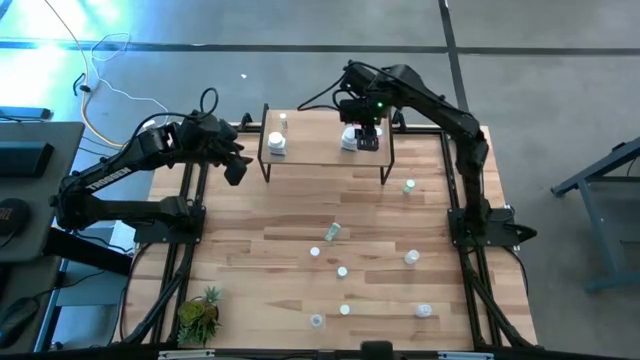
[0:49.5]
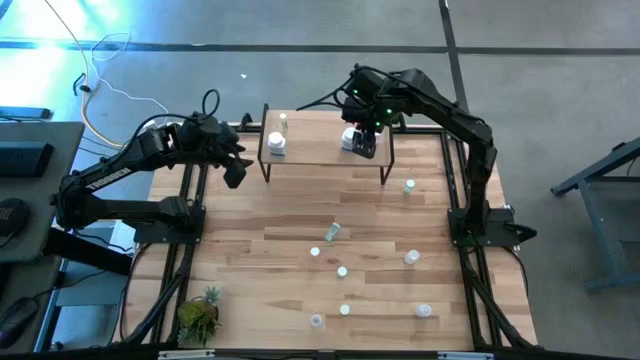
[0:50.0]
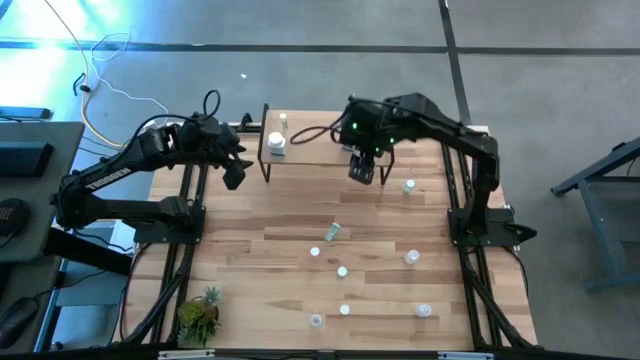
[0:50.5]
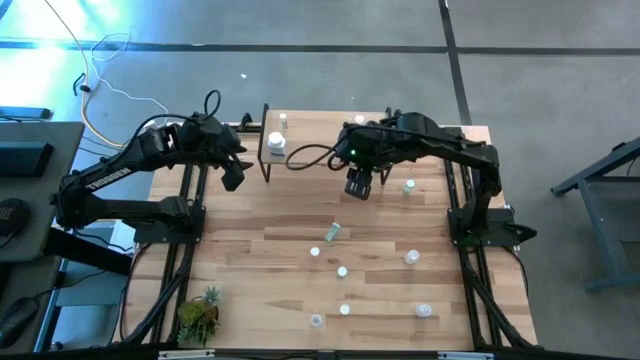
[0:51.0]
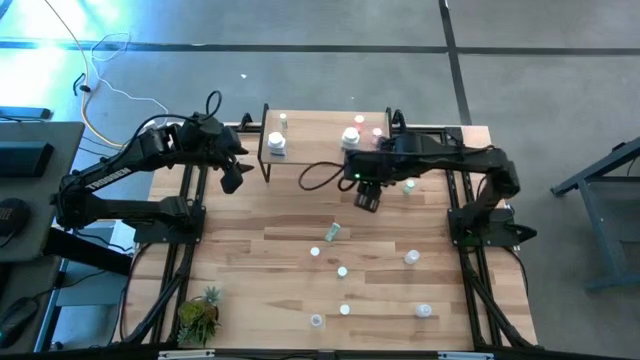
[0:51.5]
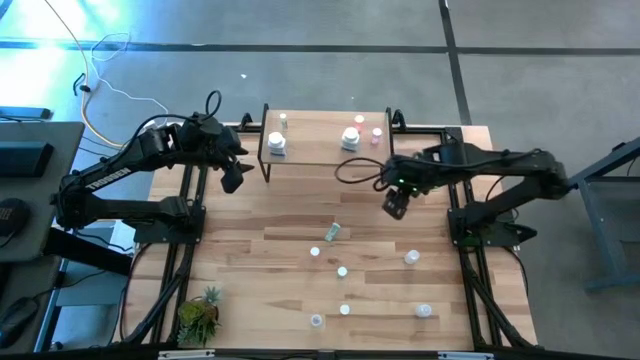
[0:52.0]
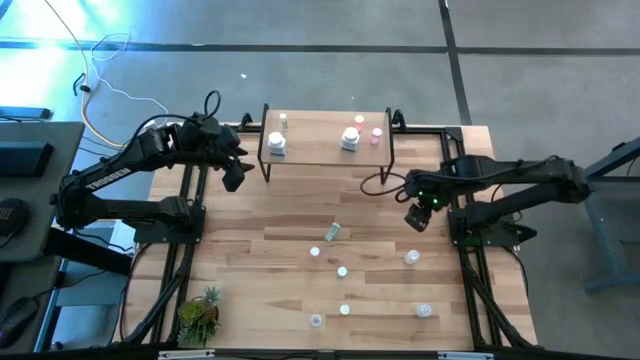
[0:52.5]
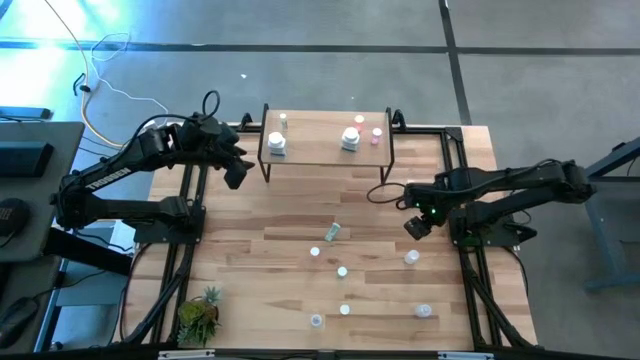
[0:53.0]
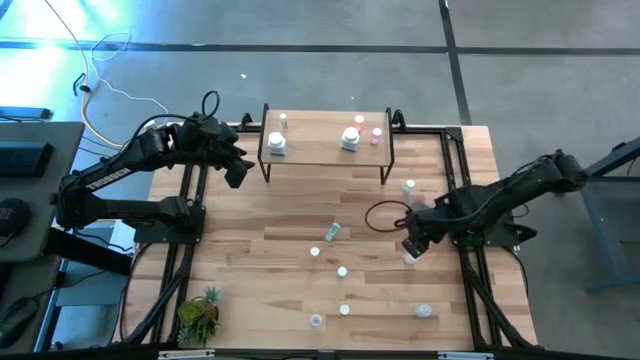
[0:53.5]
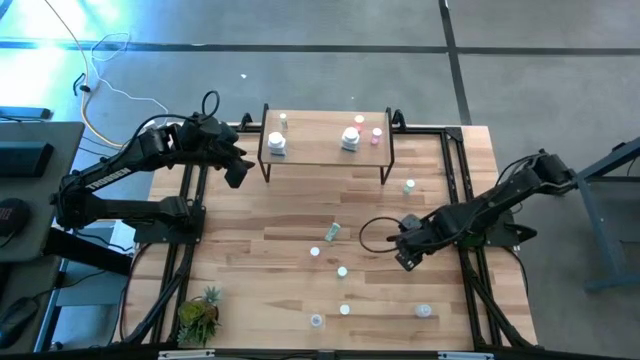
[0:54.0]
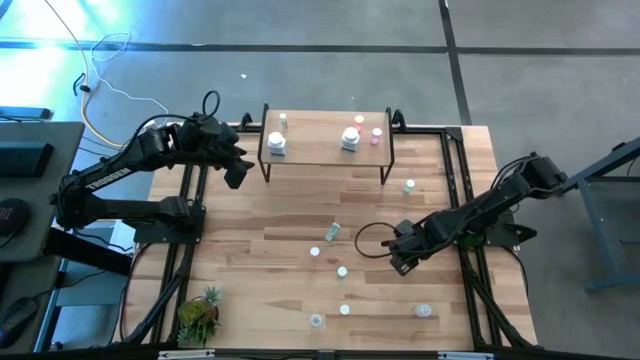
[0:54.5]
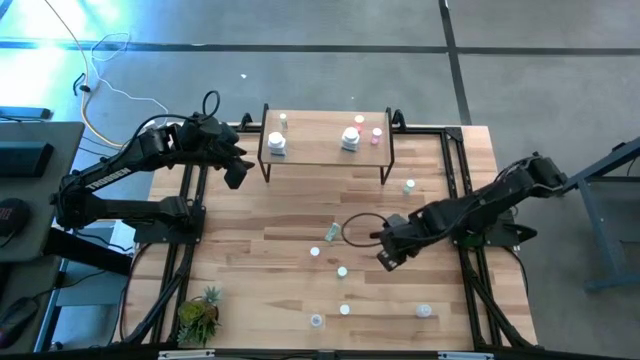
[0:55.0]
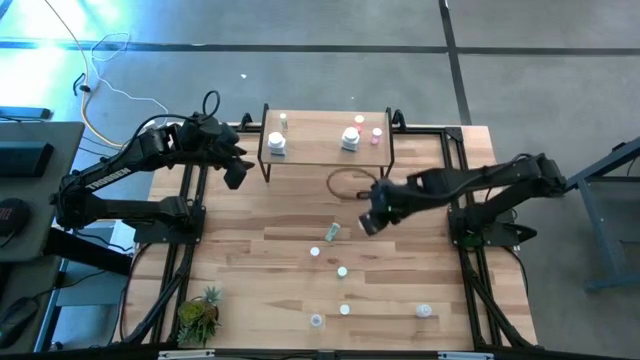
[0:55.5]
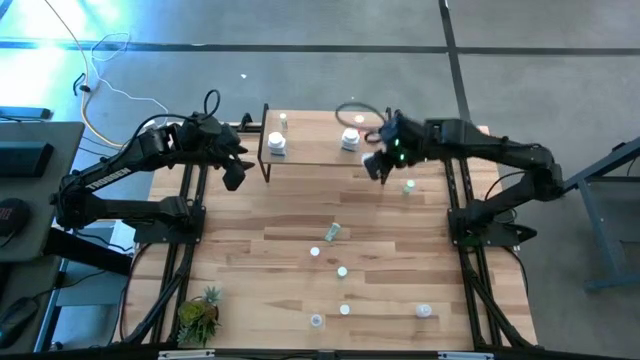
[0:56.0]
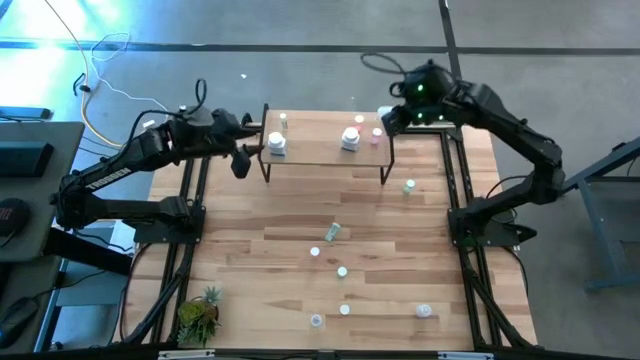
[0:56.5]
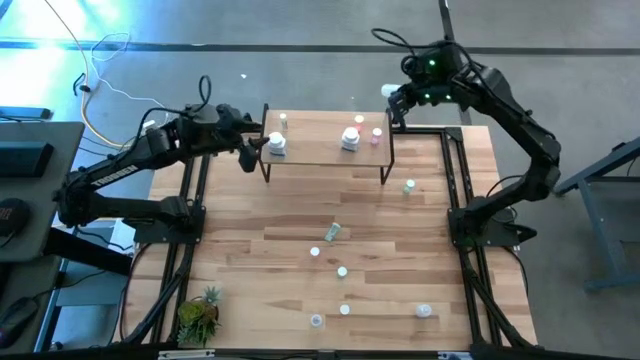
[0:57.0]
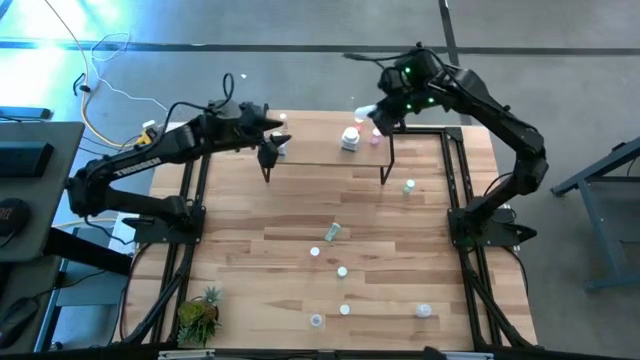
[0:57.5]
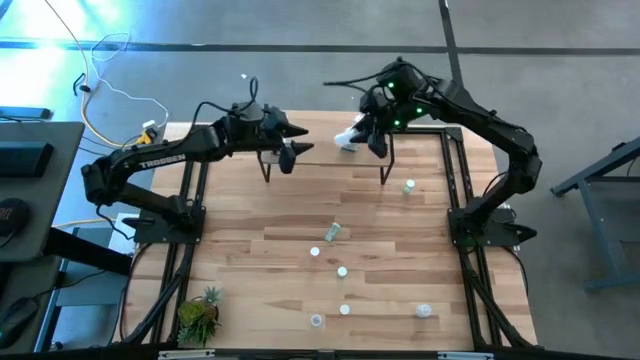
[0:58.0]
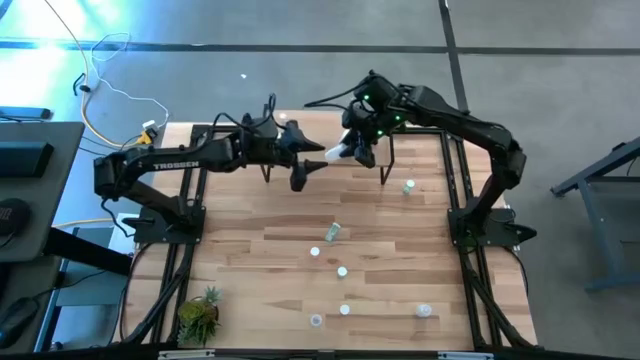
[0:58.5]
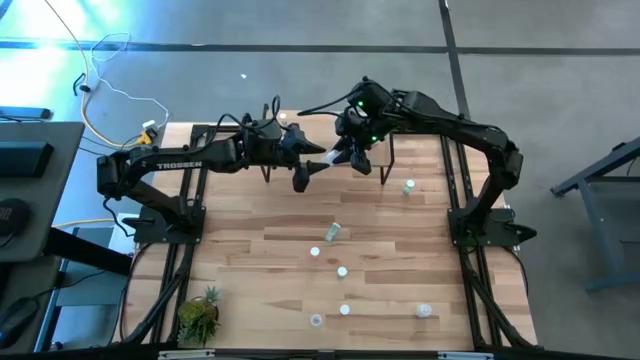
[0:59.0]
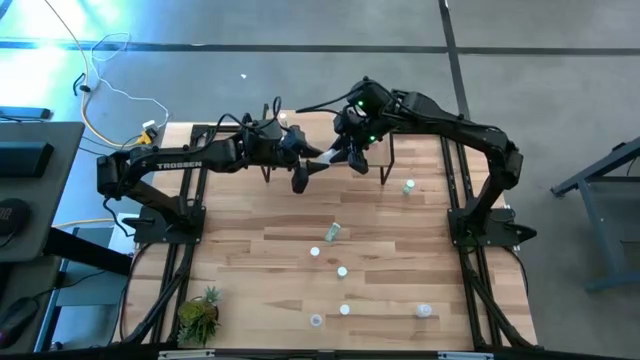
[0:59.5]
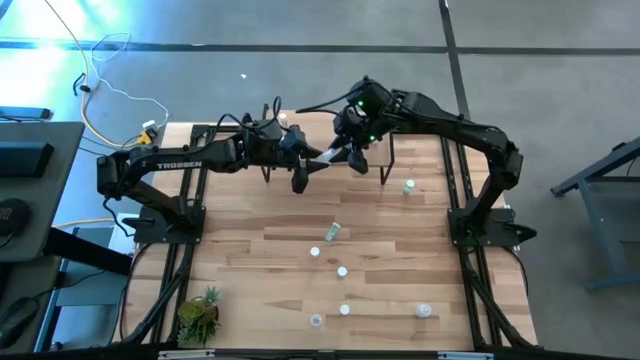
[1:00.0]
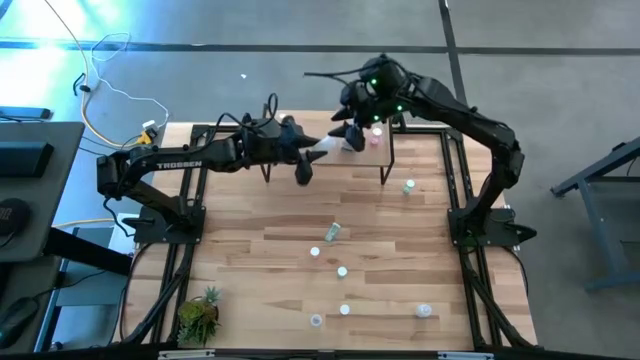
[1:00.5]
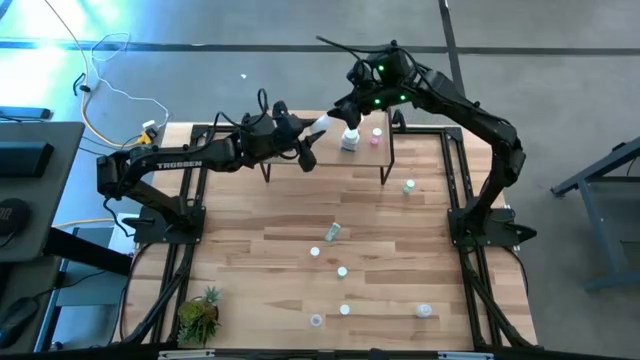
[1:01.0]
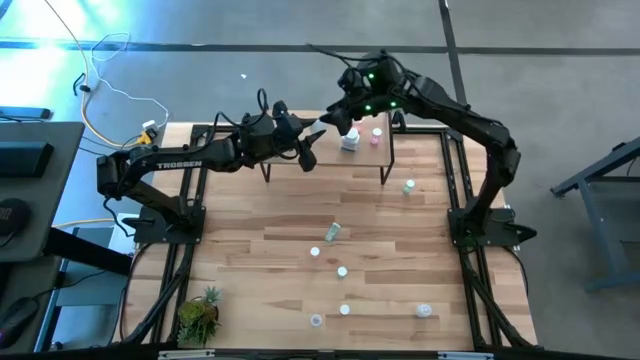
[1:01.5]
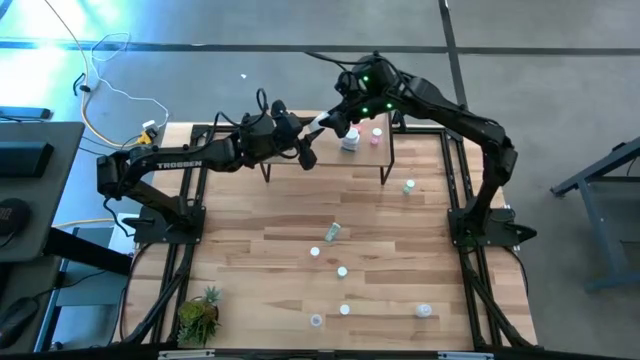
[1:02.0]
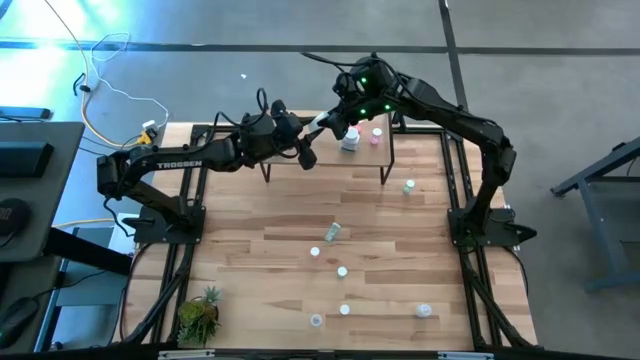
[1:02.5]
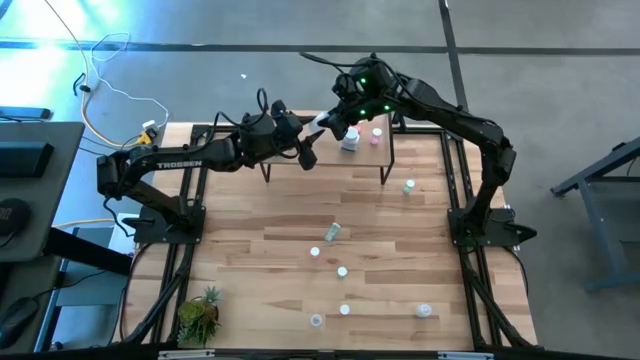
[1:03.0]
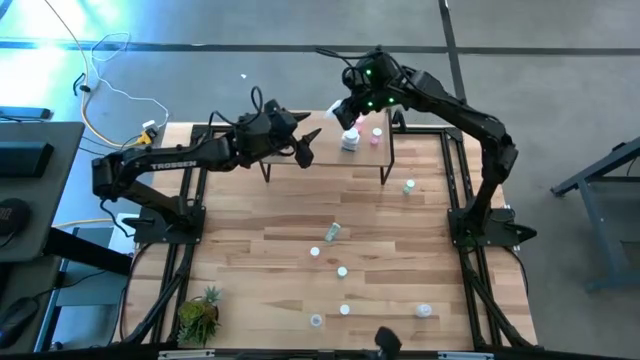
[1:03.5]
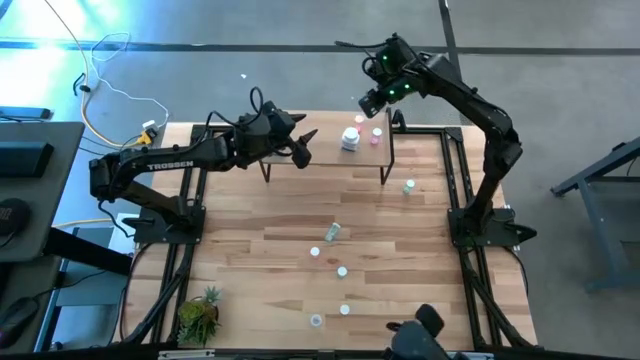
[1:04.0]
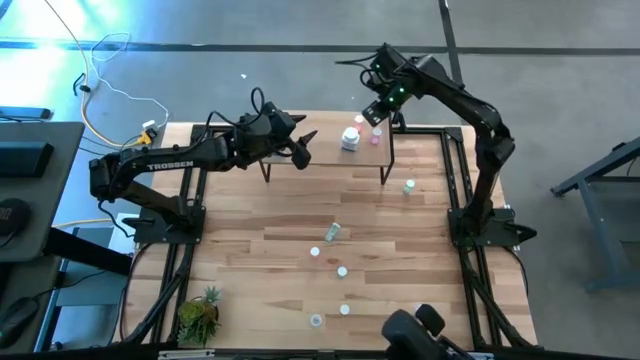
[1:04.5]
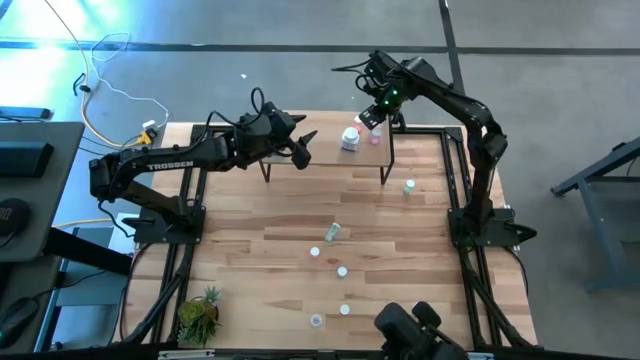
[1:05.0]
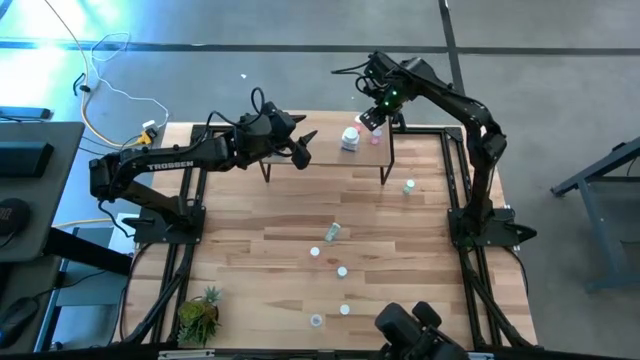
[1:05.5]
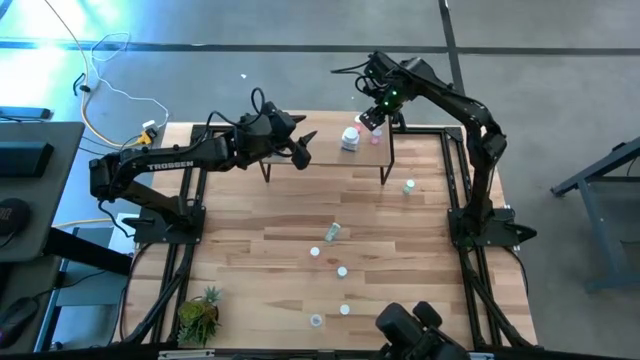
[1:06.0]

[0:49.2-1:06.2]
Task: Pick and place medicine bottles onto shelf by color
Put the top transparent pill bottle on the shelf

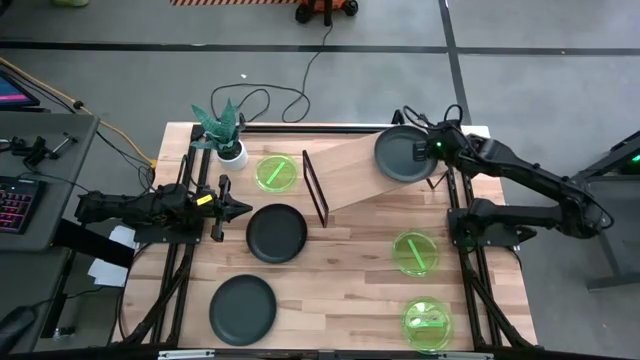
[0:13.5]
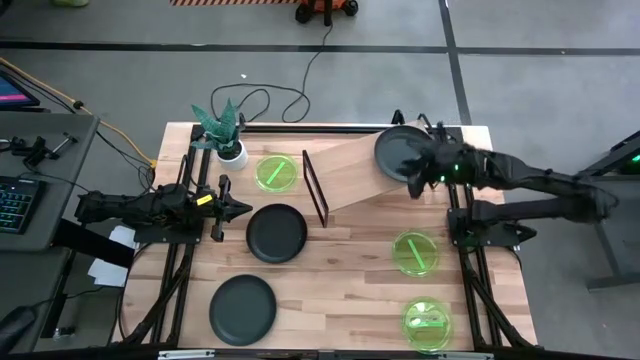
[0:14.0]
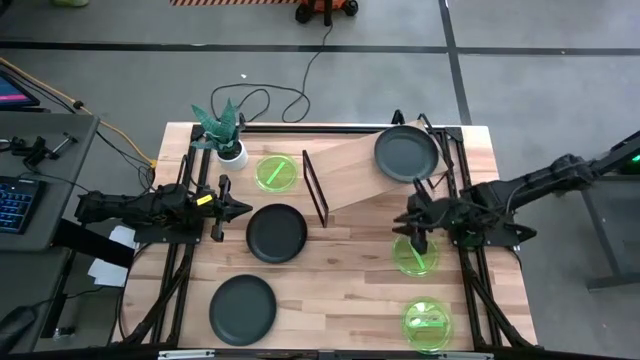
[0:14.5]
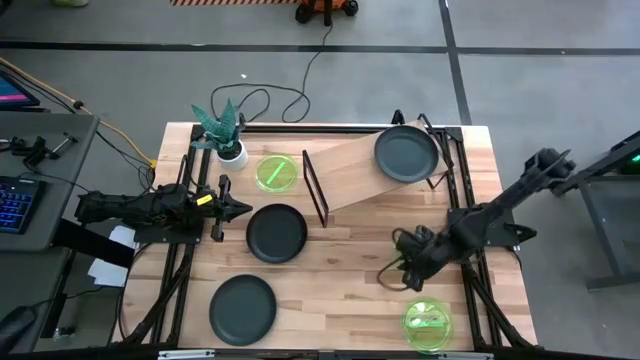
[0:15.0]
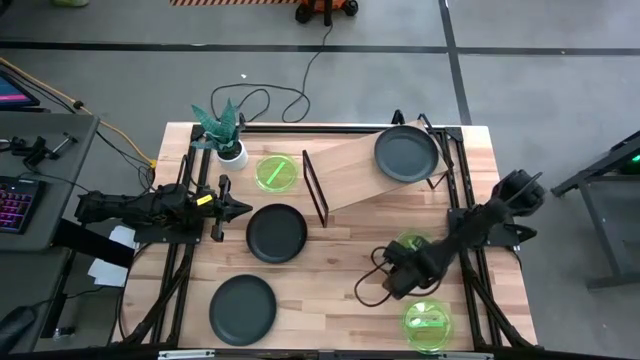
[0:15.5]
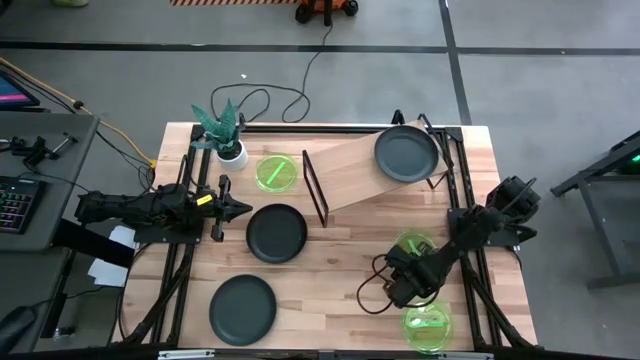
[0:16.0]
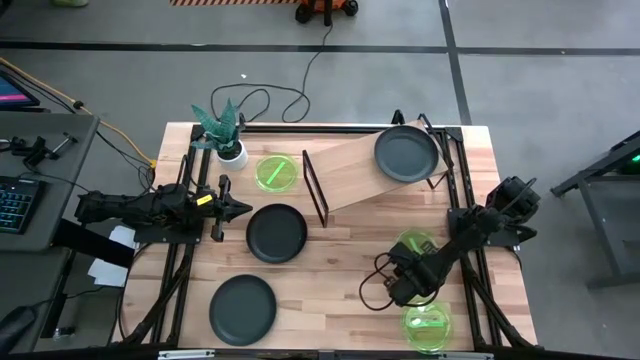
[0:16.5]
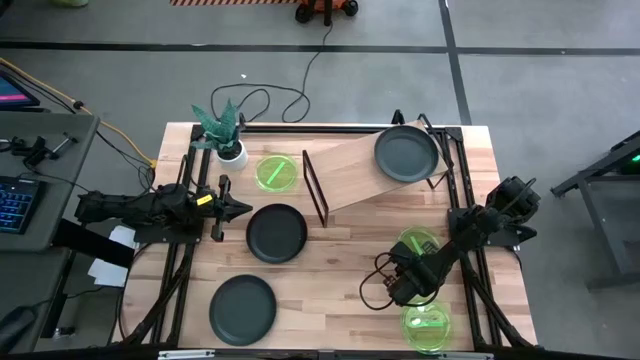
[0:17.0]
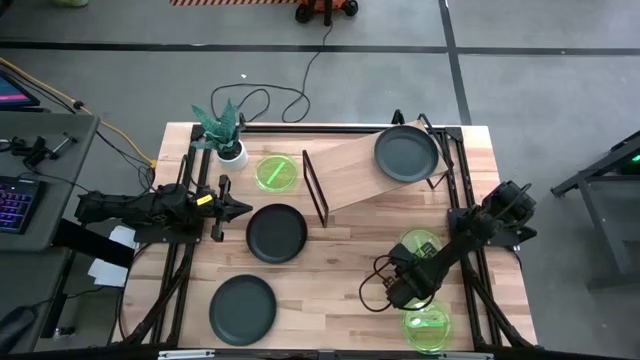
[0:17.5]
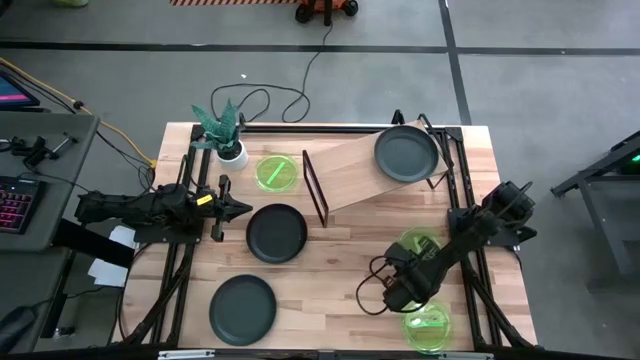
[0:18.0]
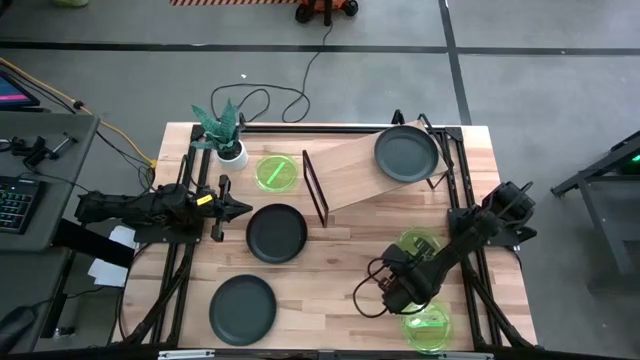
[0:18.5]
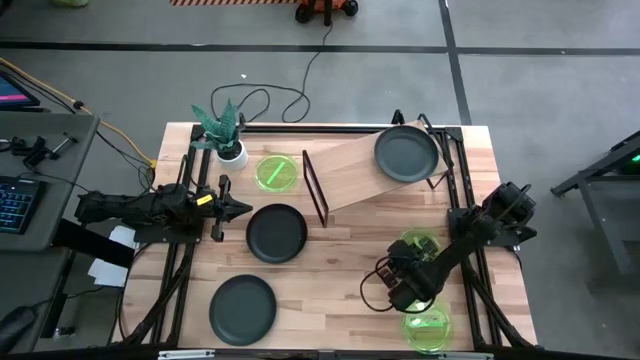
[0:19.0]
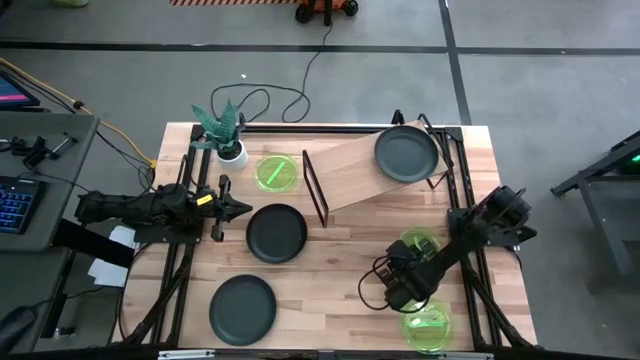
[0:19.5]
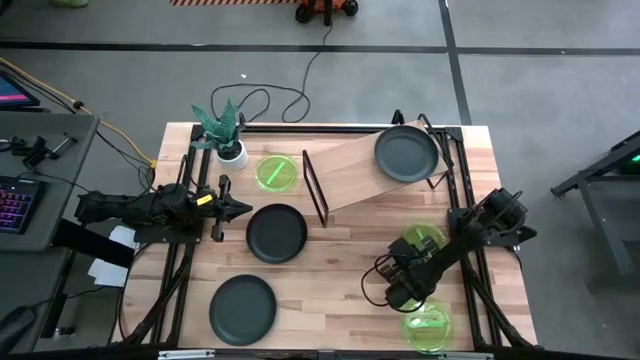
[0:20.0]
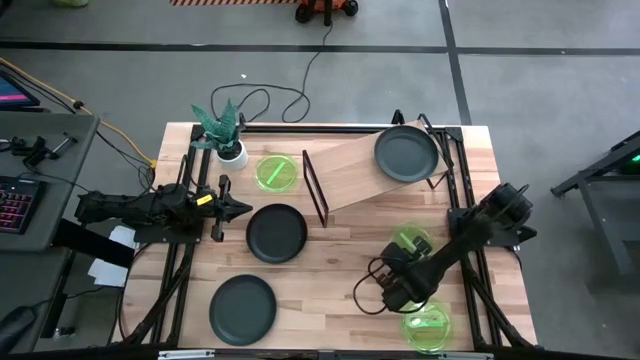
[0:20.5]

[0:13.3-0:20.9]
Task: Place and stack plates onto a shelf
Put the middle right green plate on the shelf
